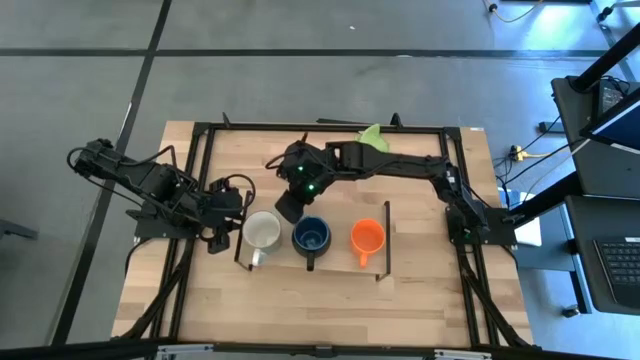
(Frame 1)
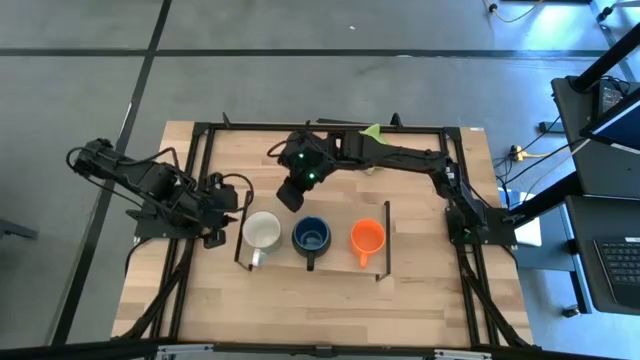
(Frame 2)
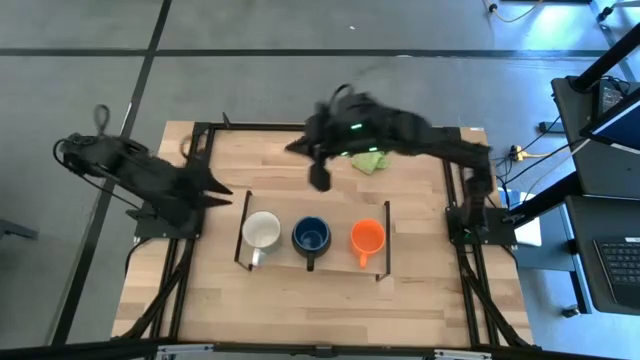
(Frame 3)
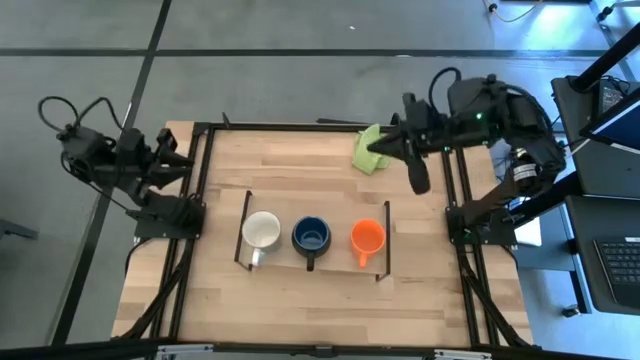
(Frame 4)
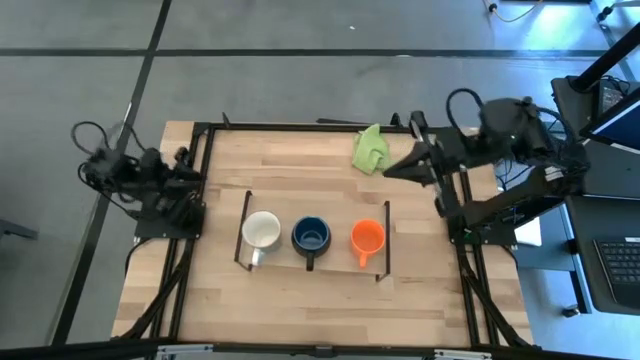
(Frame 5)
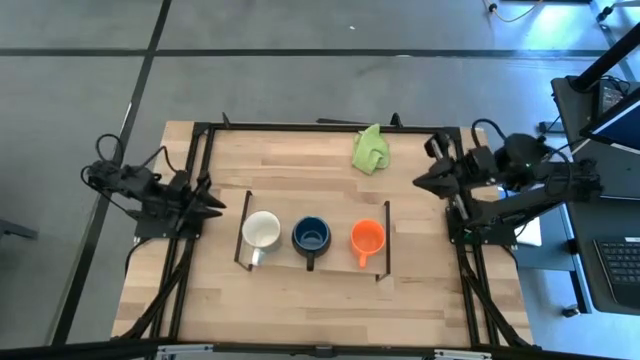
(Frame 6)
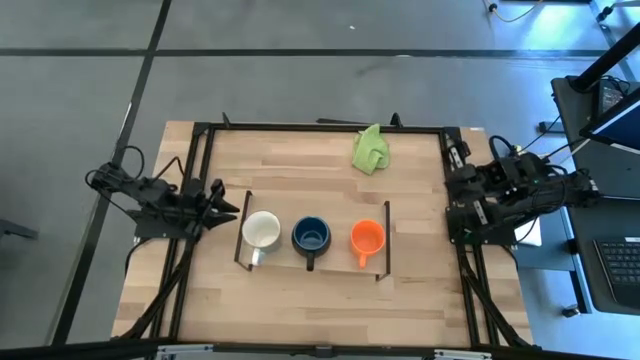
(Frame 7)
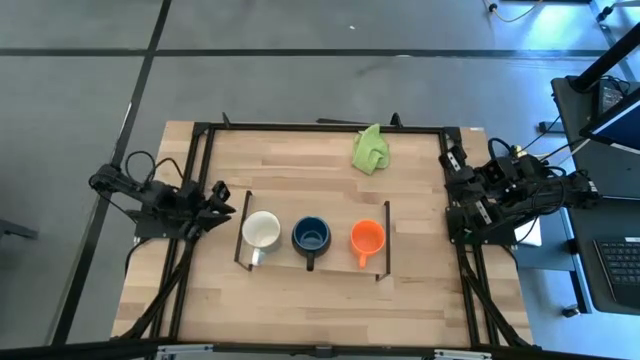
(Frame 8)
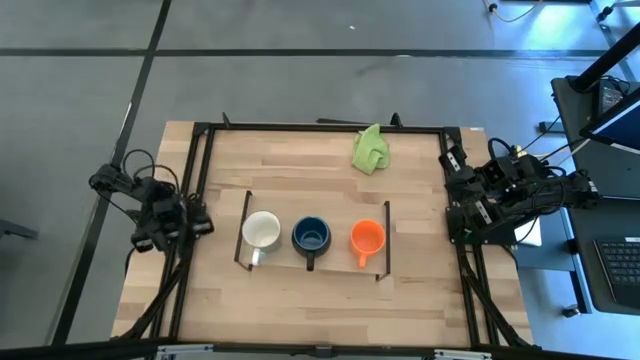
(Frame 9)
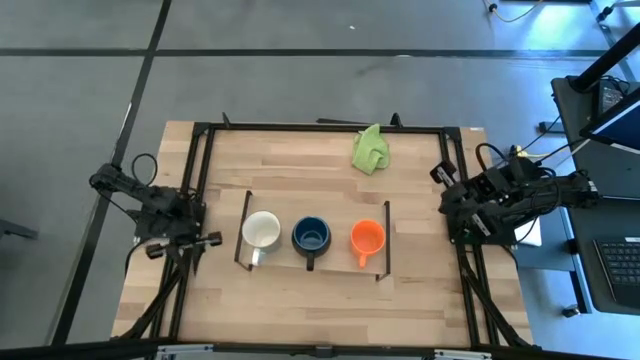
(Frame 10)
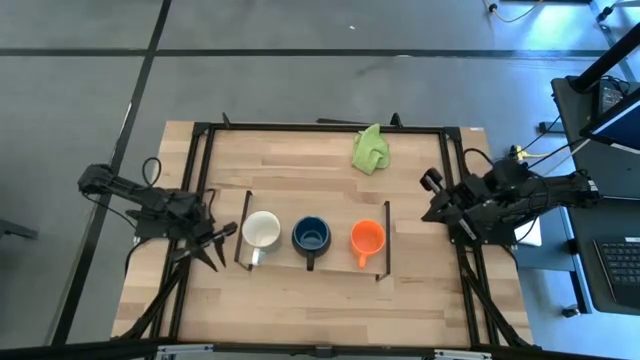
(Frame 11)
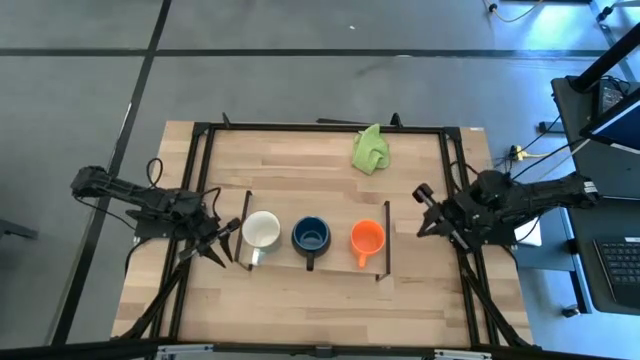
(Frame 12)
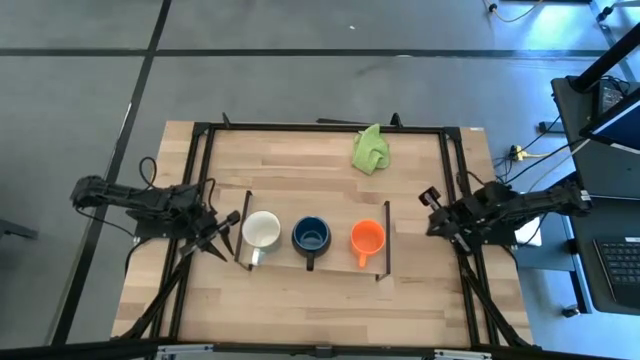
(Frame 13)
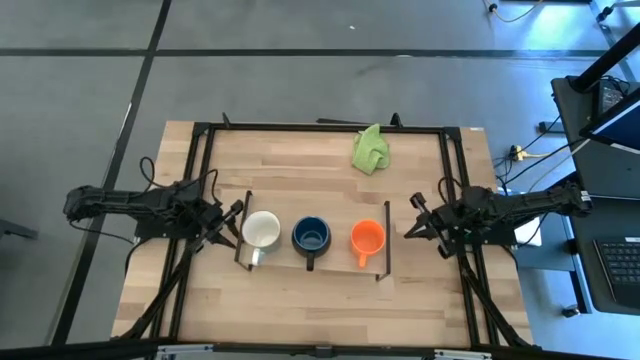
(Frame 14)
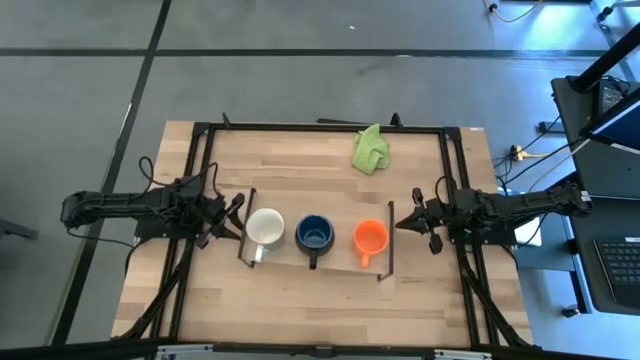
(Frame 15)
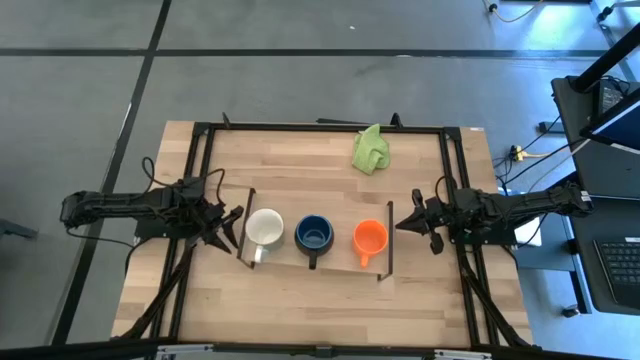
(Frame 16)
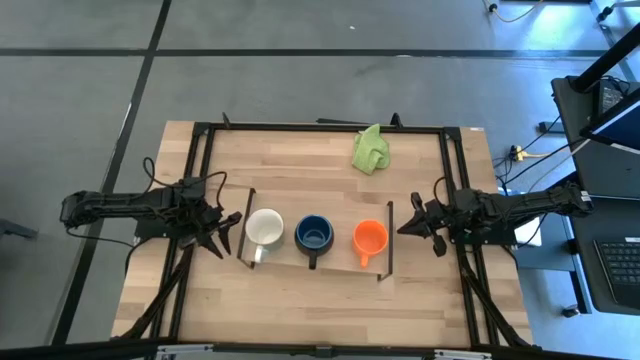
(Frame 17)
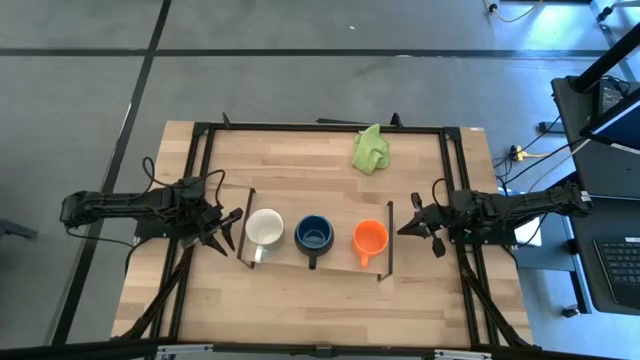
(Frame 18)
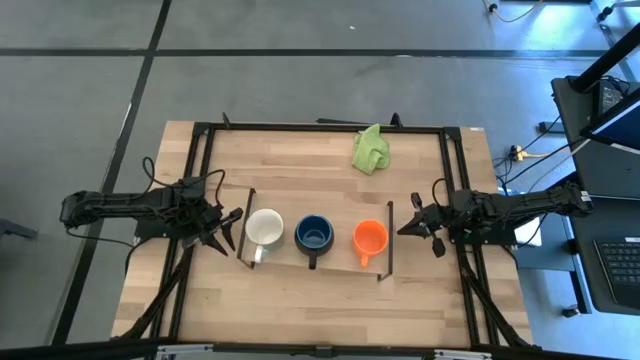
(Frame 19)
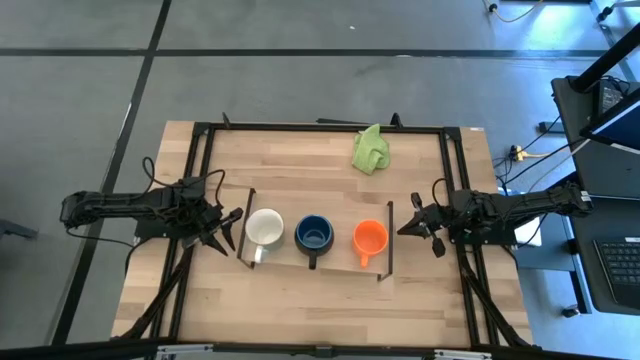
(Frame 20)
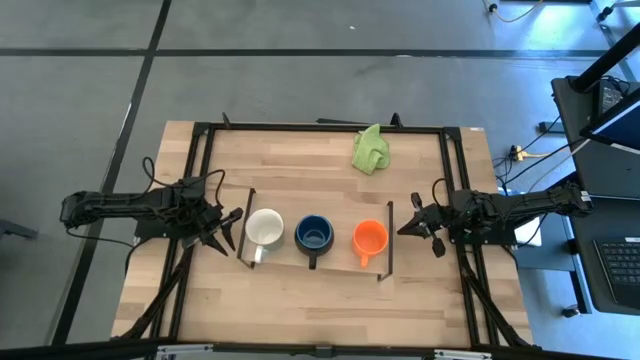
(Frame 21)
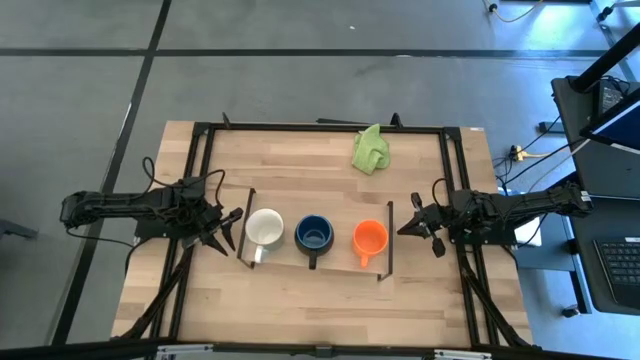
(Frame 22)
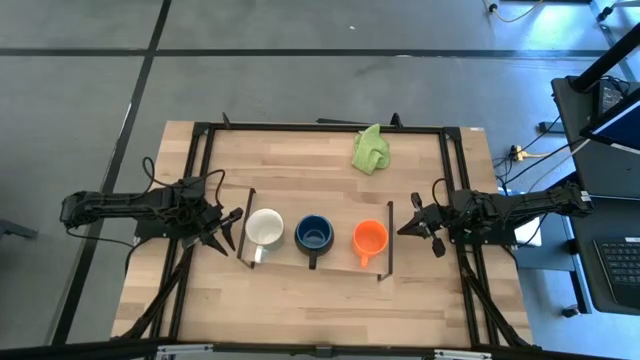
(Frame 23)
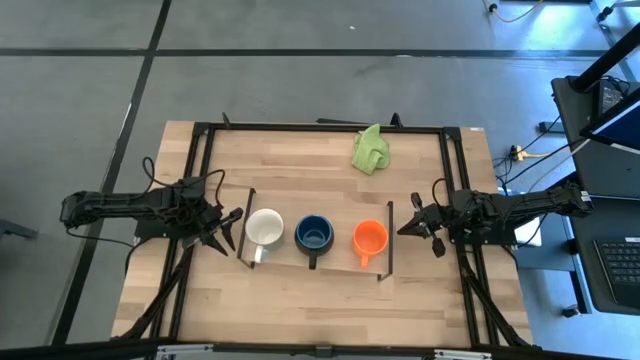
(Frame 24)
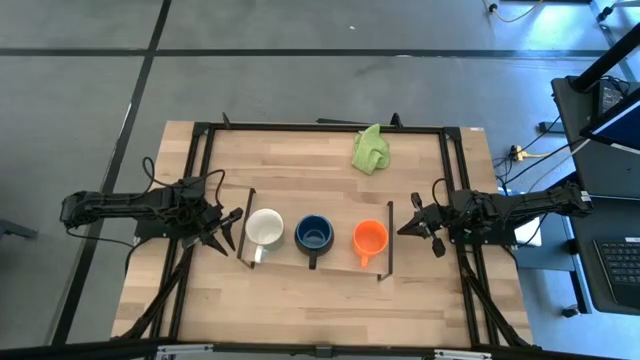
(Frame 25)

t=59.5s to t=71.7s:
Task: Stack small to large cups/mugs on shelf
Return to Home Position

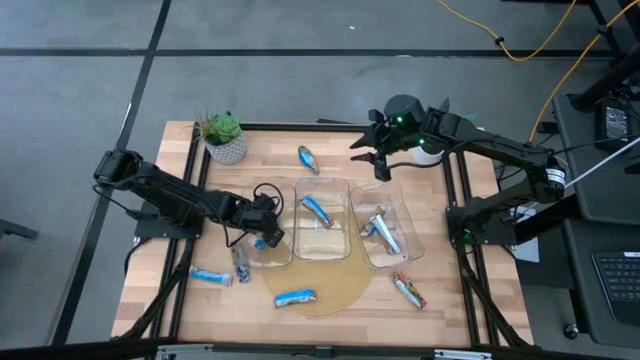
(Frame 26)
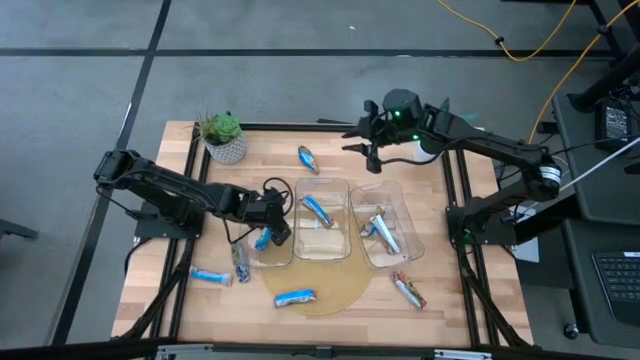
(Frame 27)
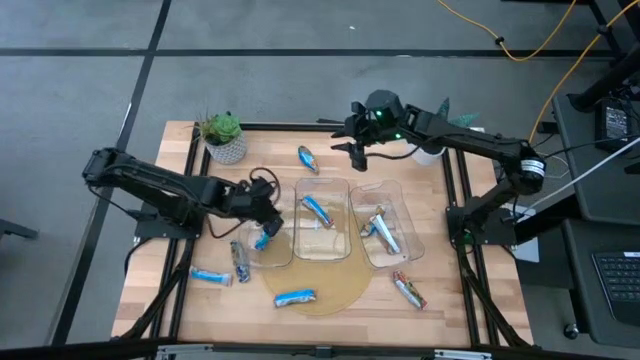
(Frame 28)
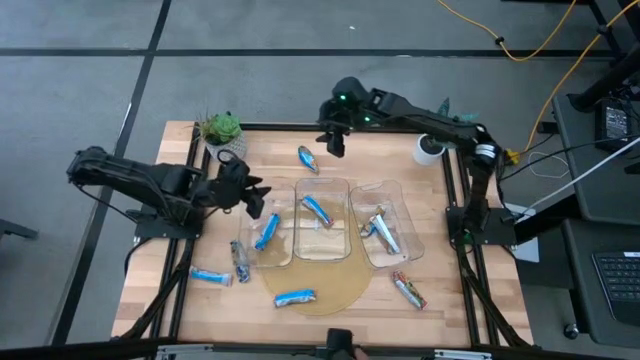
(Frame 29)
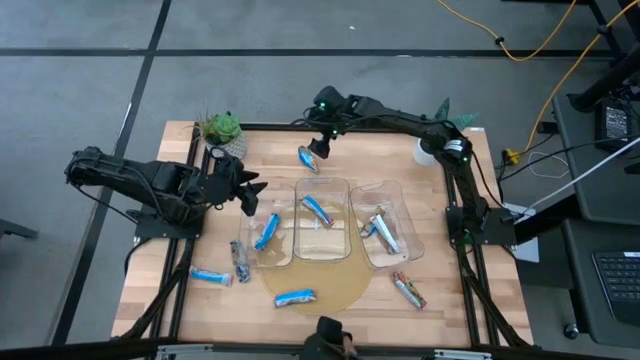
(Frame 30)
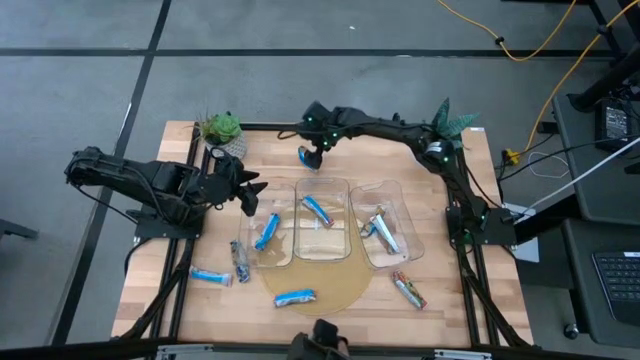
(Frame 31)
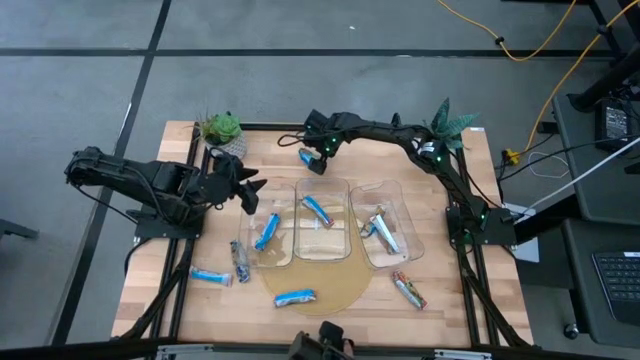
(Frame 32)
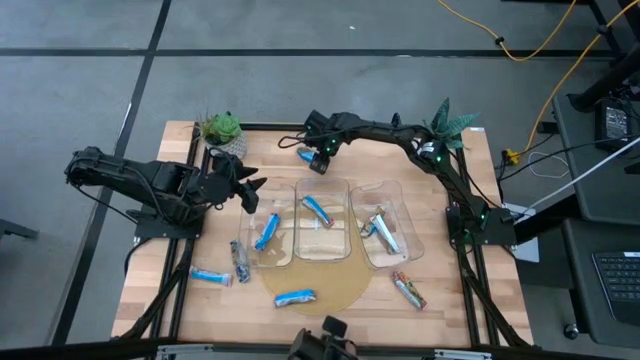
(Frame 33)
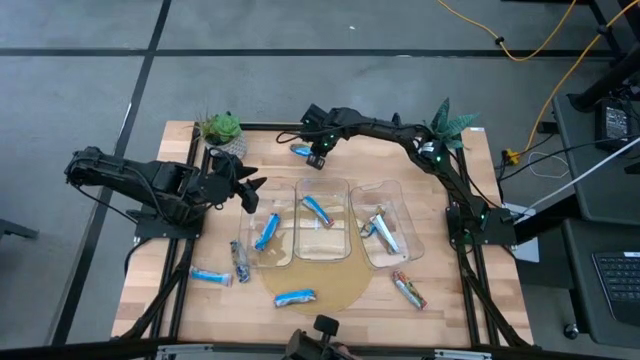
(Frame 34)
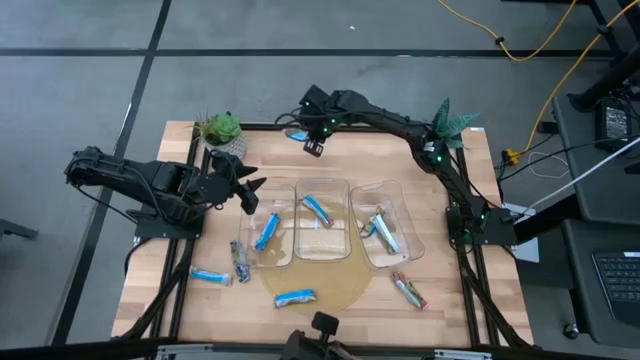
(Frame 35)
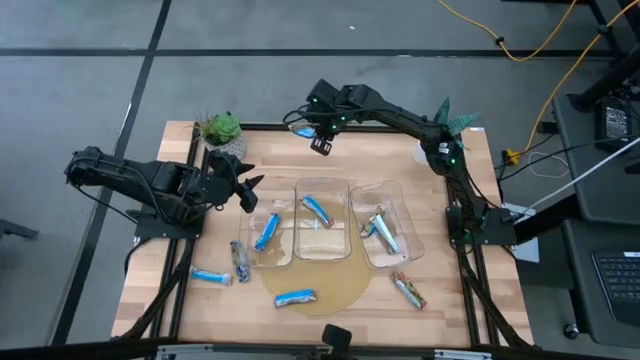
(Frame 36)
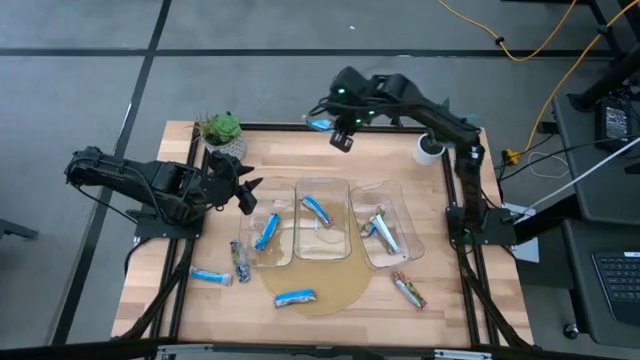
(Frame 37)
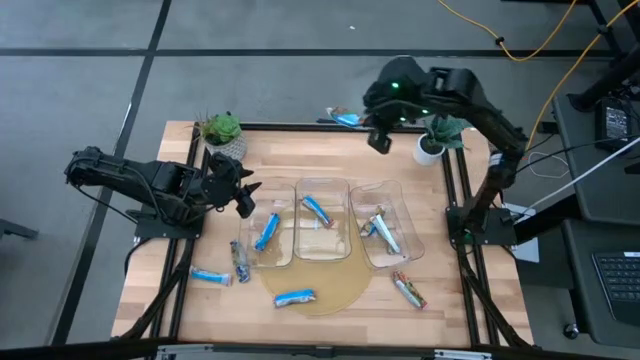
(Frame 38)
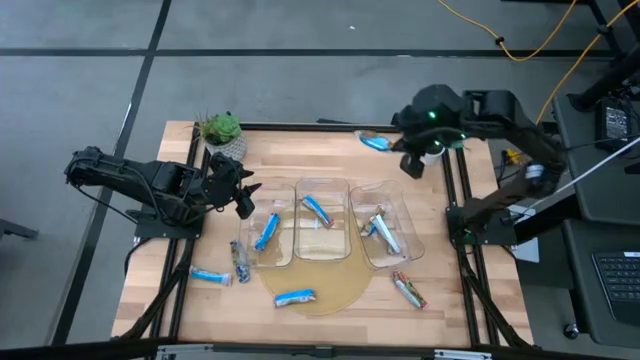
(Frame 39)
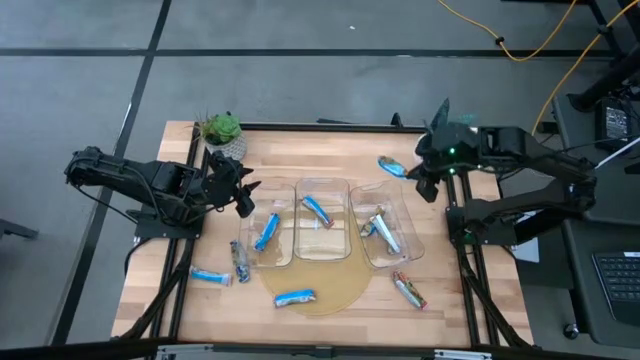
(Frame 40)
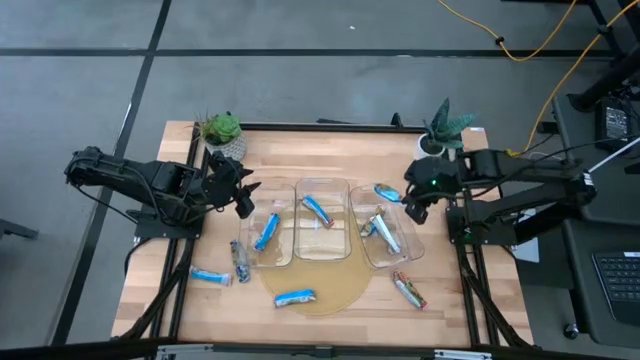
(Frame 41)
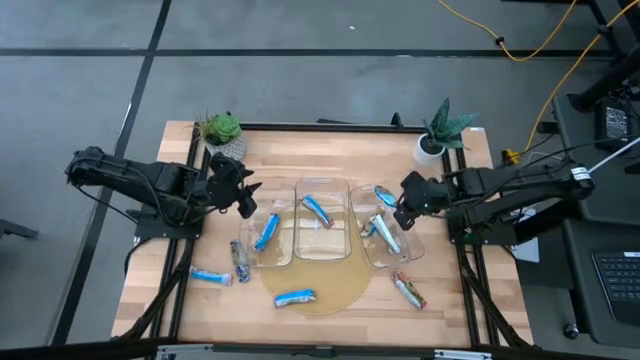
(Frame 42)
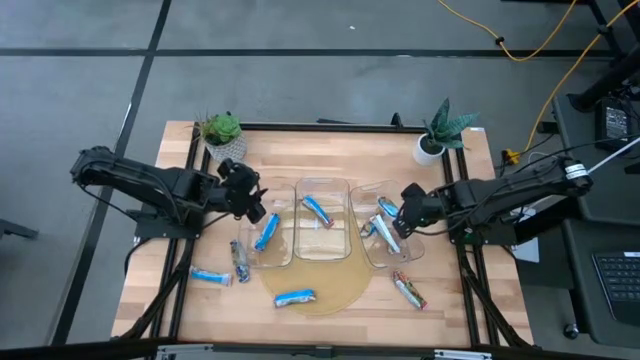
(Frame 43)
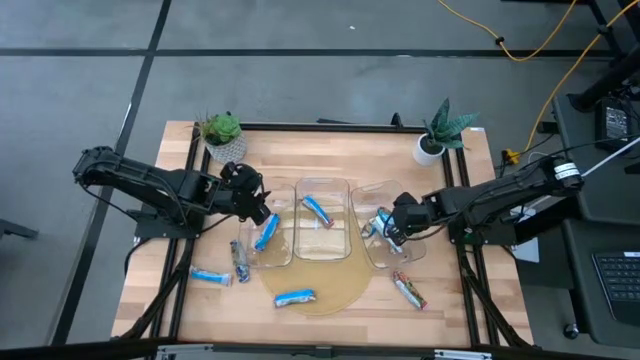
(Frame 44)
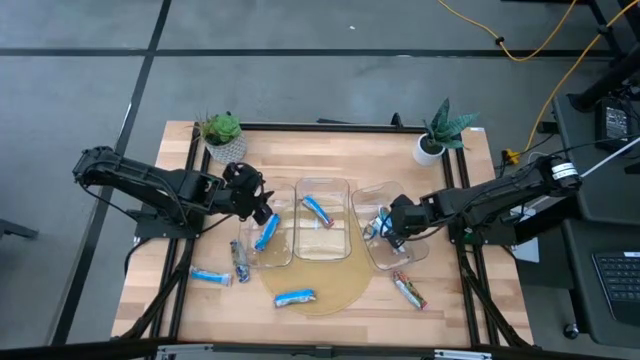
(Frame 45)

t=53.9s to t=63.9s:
Task: Pick and place Granola Bars by type
Put the yellow granola bar into the right transparent bin
